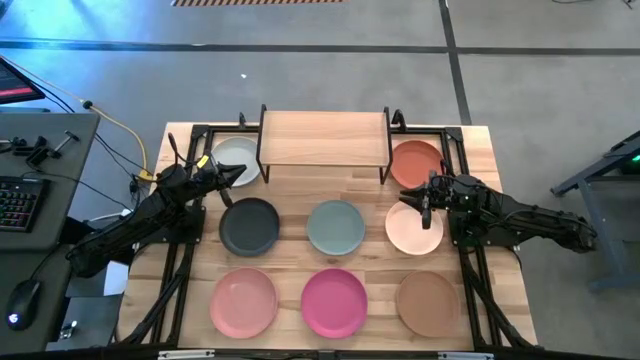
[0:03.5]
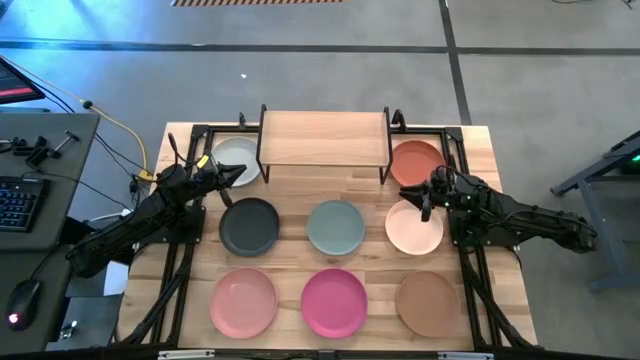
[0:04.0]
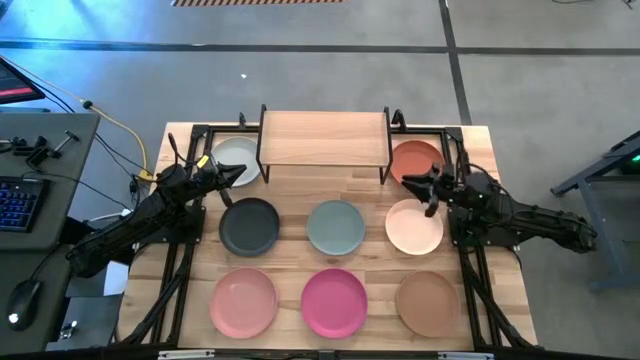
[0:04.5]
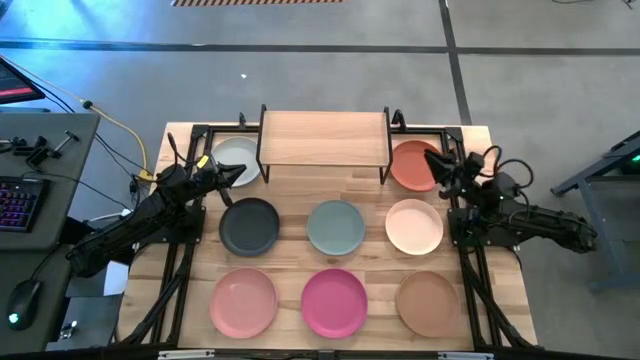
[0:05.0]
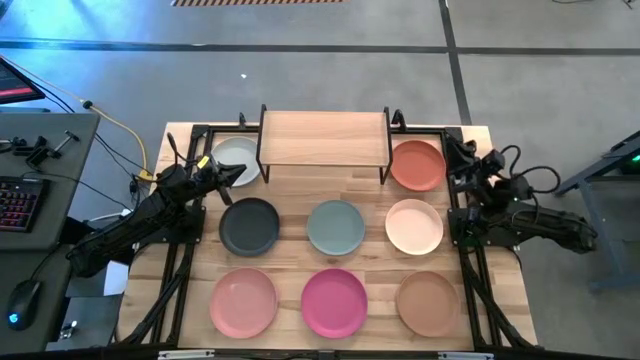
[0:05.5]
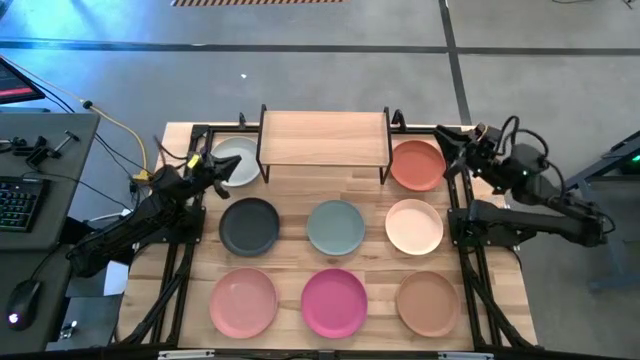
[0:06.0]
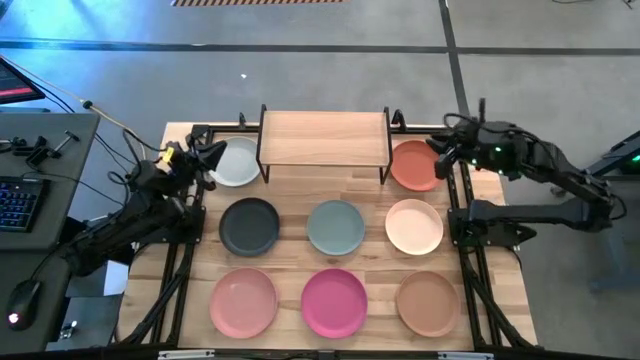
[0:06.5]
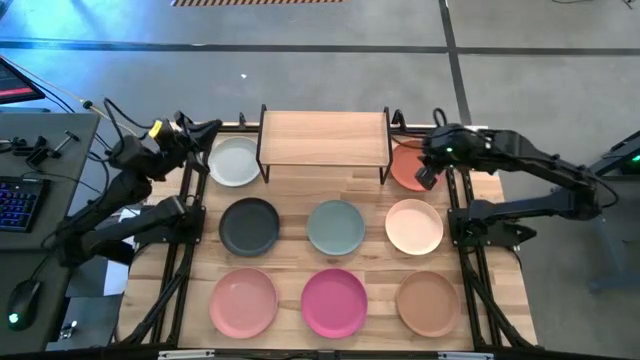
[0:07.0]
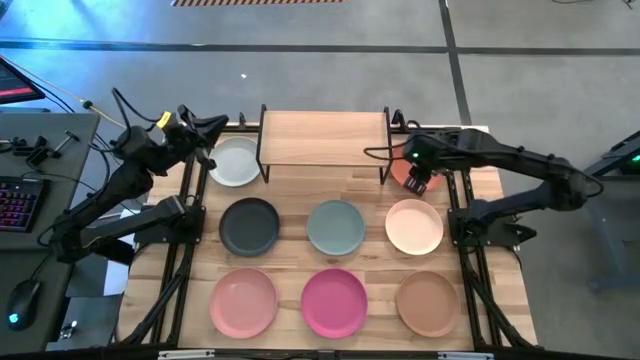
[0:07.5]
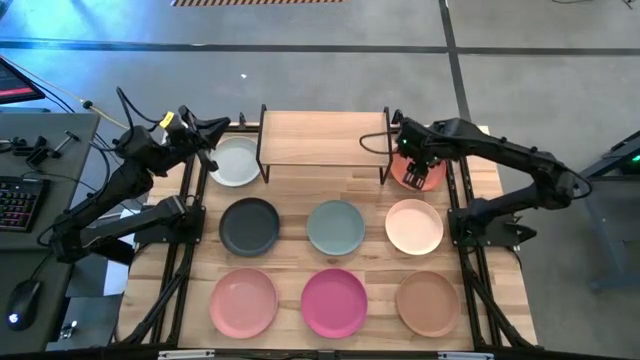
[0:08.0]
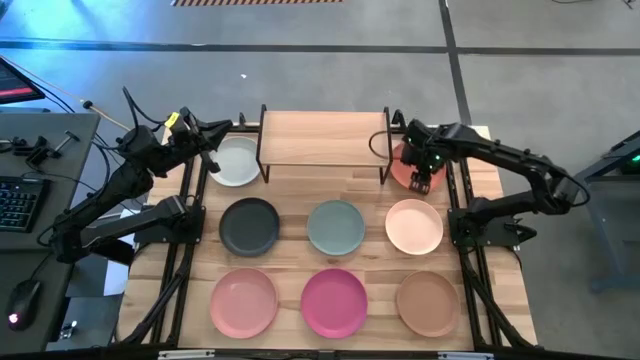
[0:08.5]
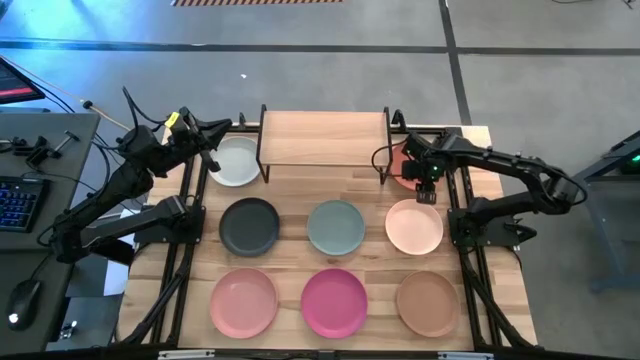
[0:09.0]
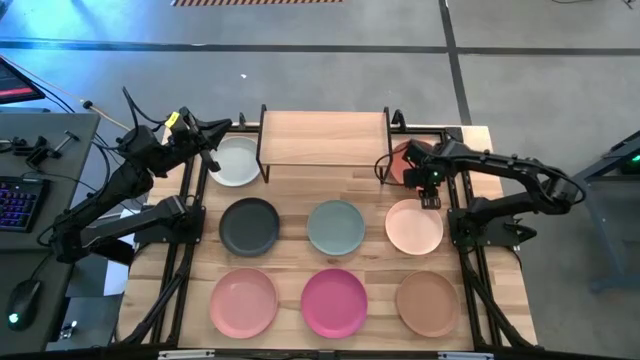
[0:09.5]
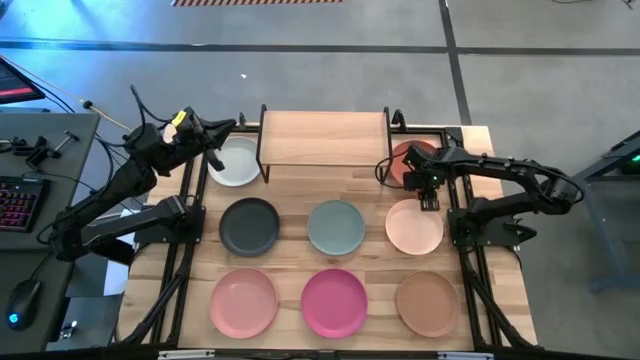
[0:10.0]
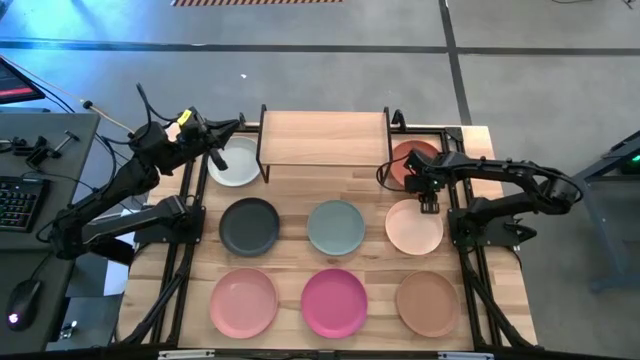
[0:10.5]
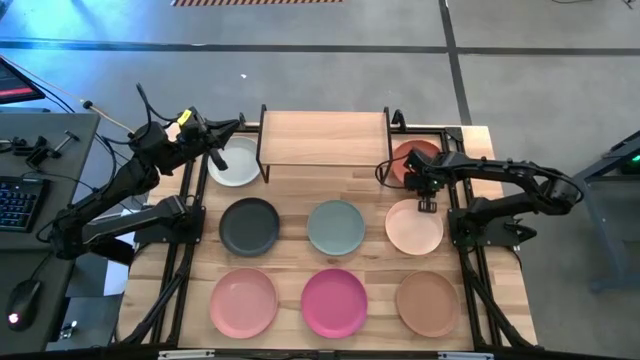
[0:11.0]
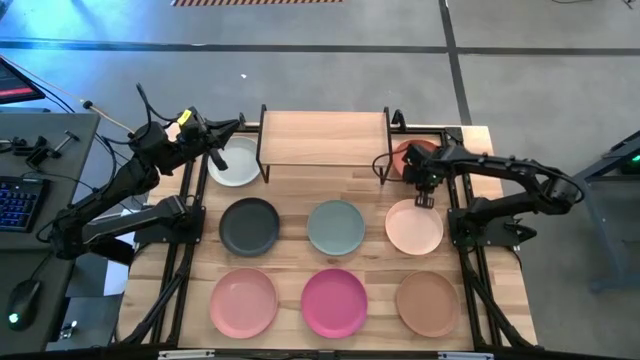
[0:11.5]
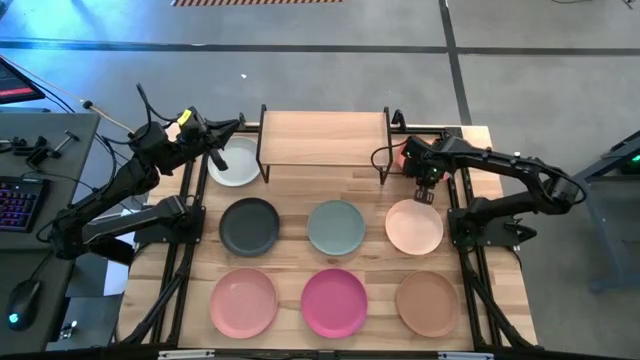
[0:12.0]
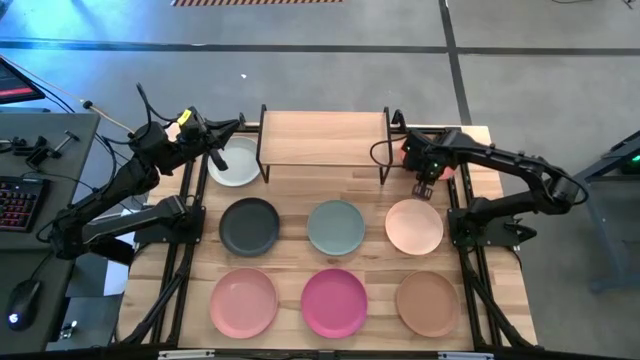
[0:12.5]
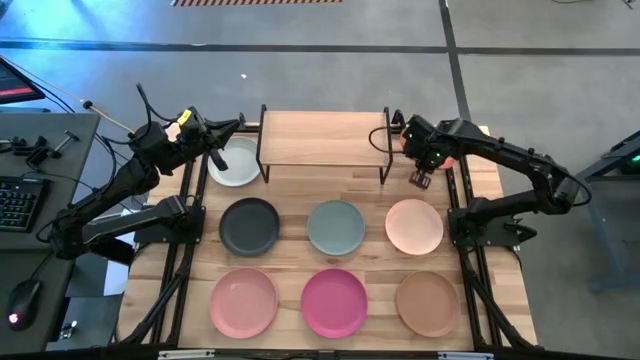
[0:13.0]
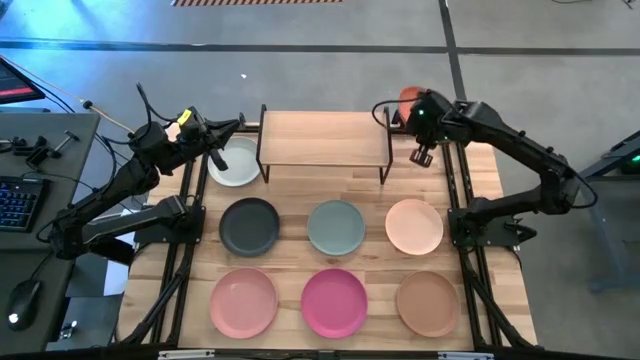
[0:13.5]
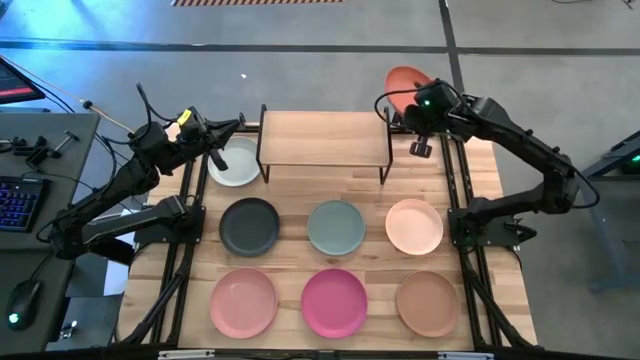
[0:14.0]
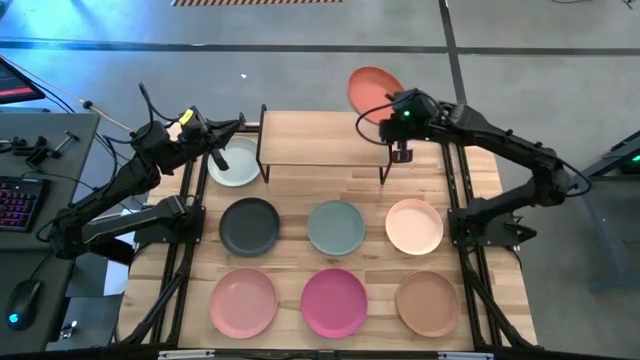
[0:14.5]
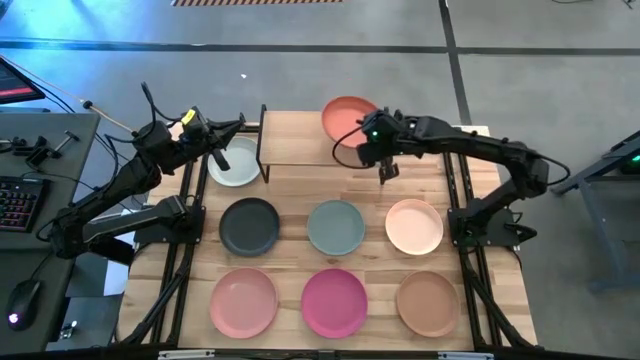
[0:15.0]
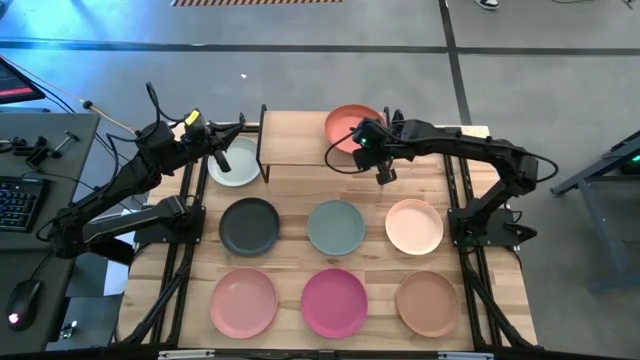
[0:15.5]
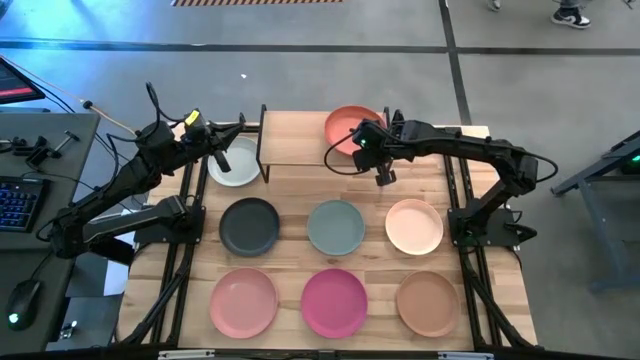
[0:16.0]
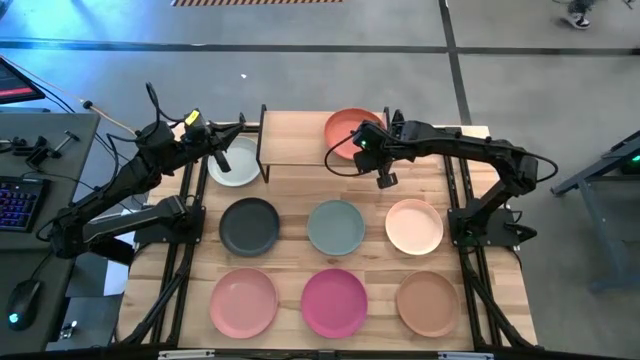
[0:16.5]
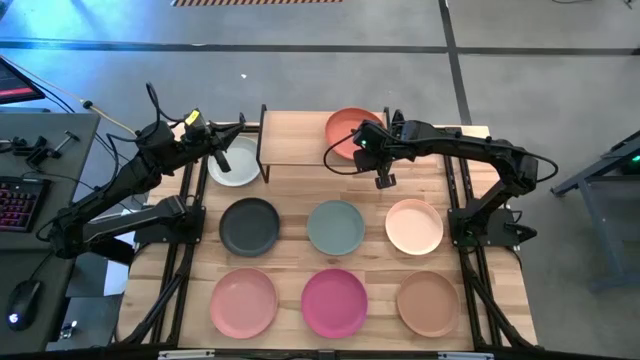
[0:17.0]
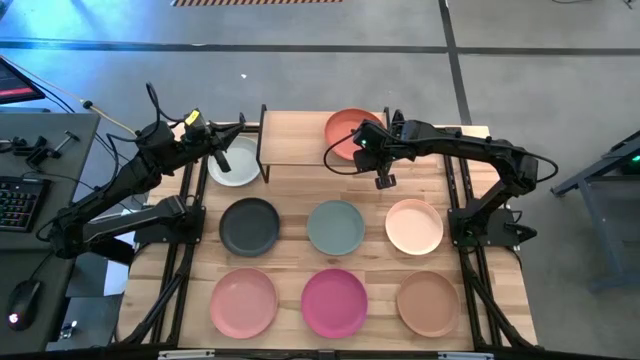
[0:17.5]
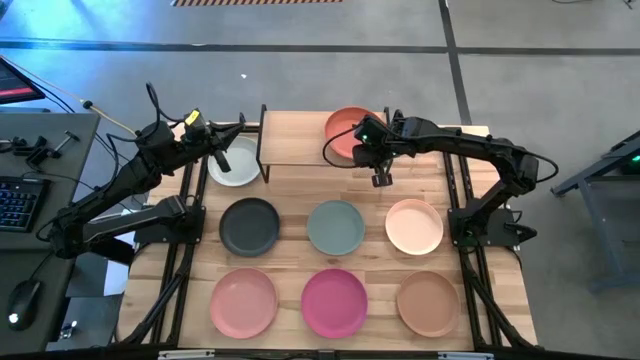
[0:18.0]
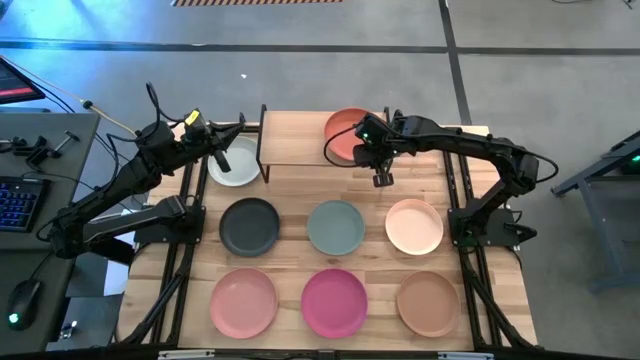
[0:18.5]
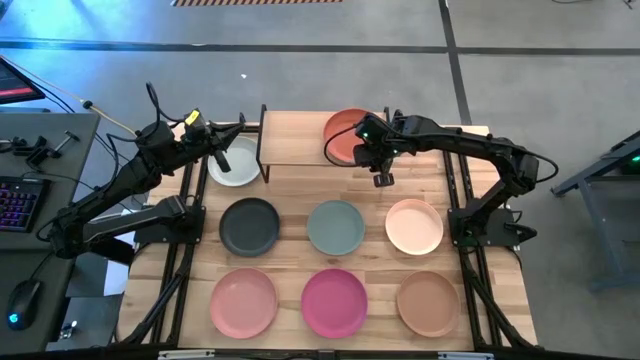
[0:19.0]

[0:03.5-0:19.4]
Task: Place and stack plates onto a shelf
Put the orange plate on the shelf

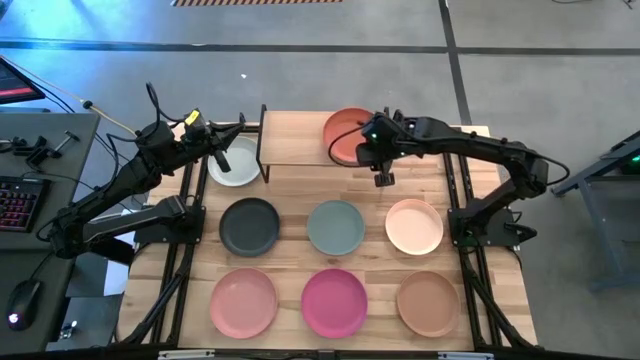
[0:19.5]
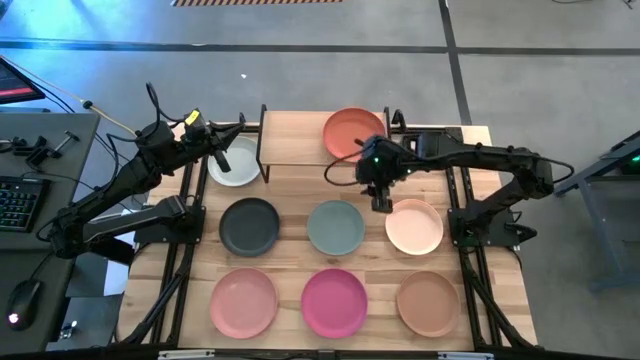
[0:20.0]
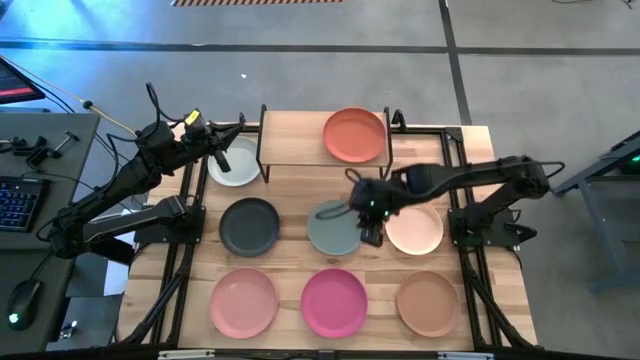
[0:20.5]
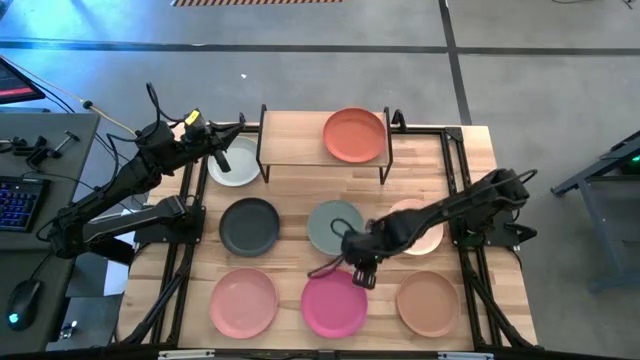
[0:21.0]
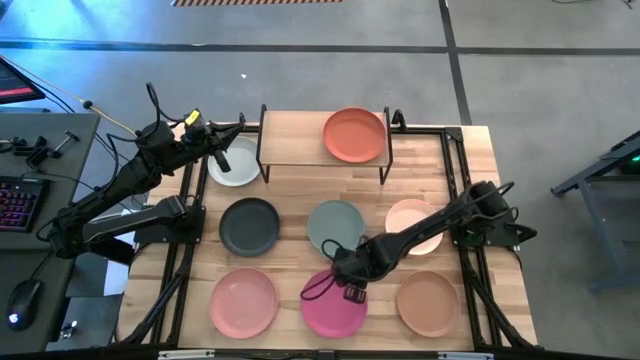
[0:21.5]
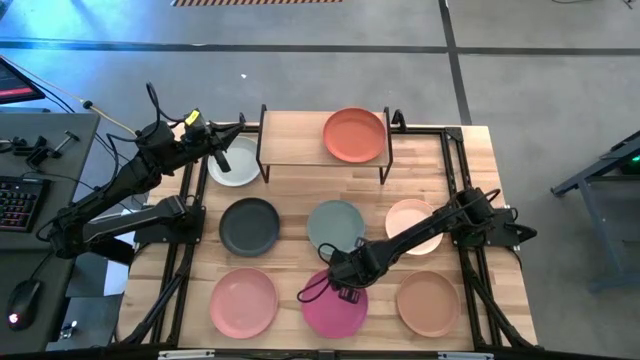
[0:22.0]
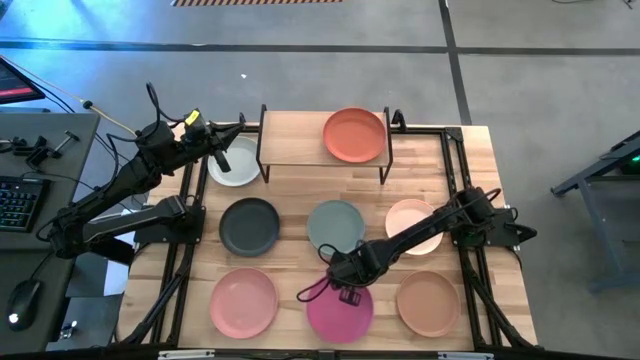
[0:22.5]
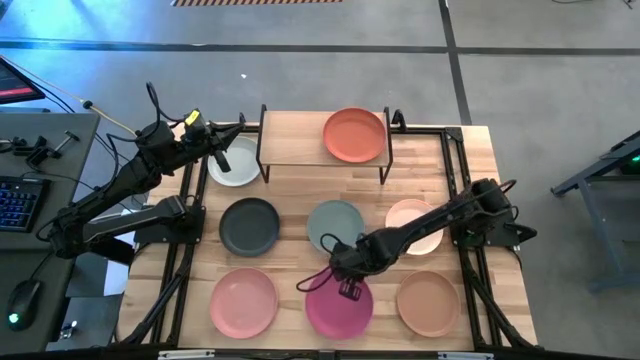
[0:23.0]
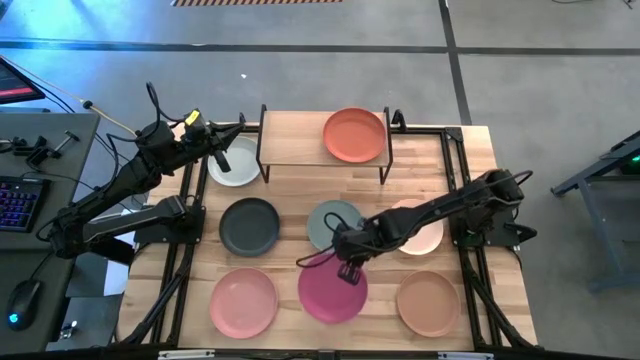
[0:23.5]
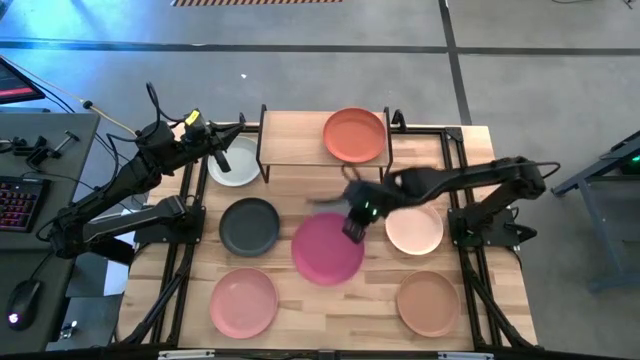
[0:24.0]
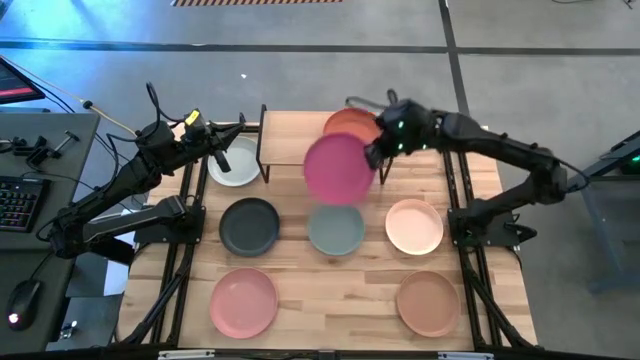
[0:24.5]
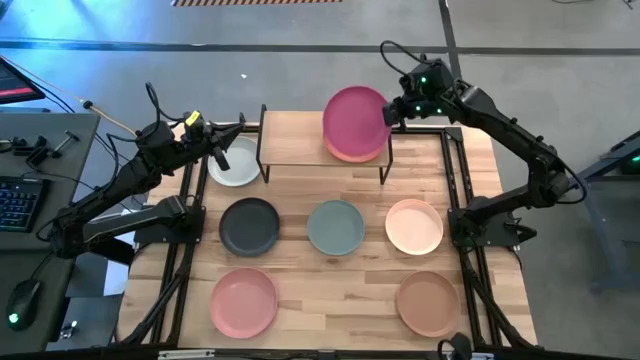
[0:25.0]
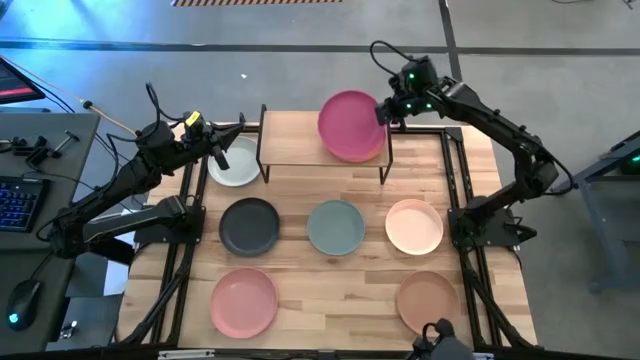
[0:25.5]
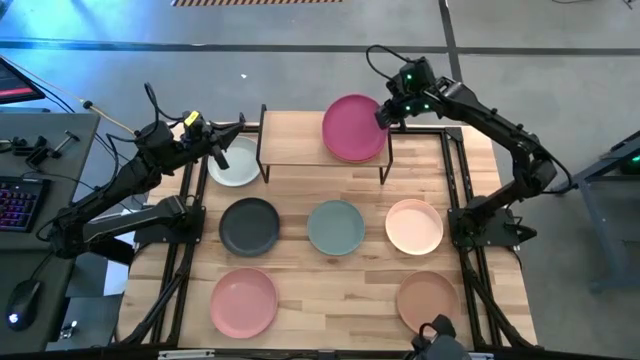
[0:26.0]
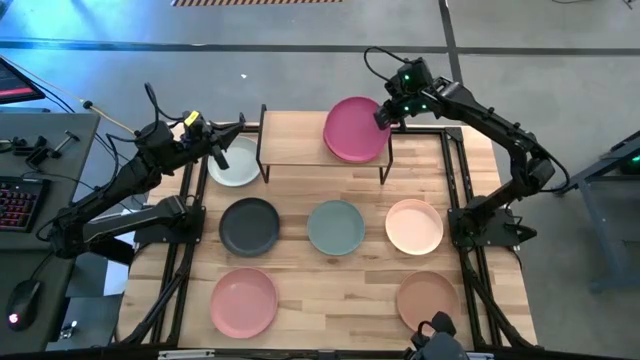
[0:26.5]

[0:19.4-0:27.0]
Stack the pink plate on top of the orange plate on the shelf
